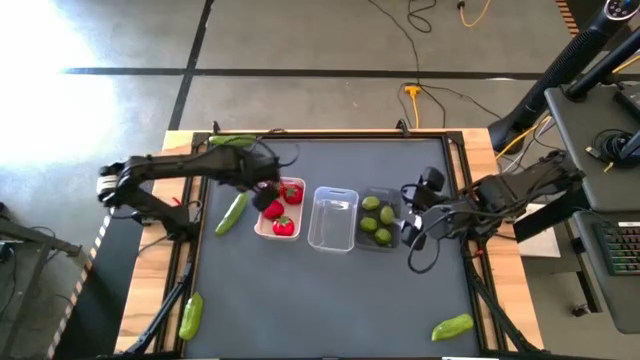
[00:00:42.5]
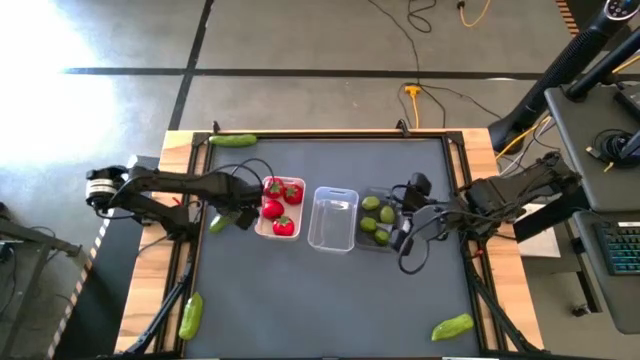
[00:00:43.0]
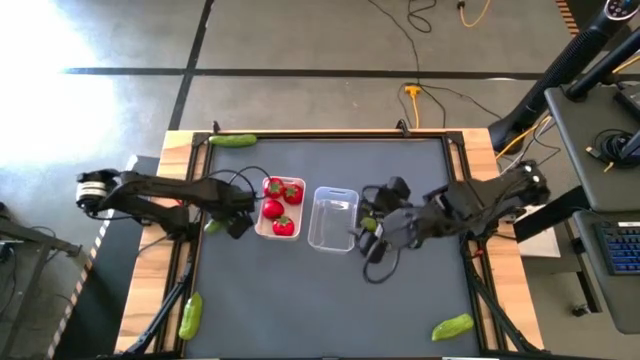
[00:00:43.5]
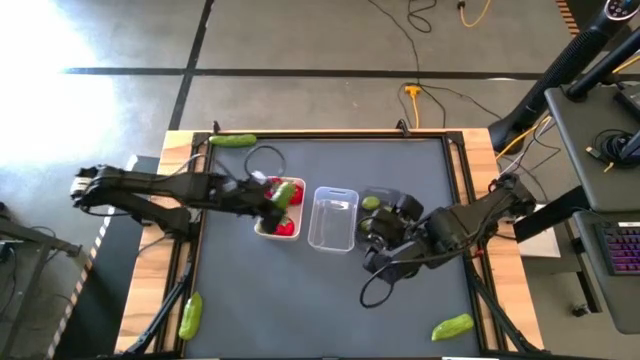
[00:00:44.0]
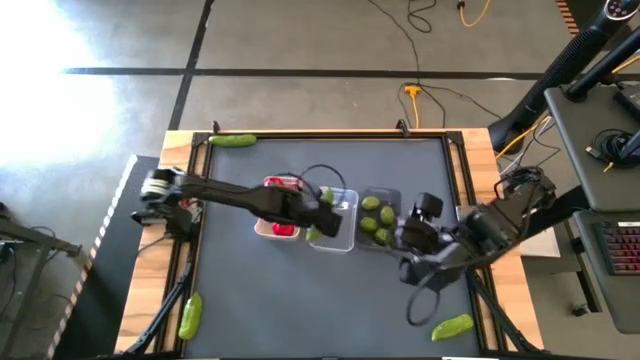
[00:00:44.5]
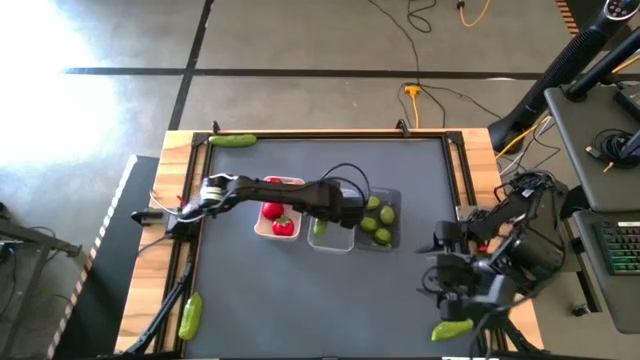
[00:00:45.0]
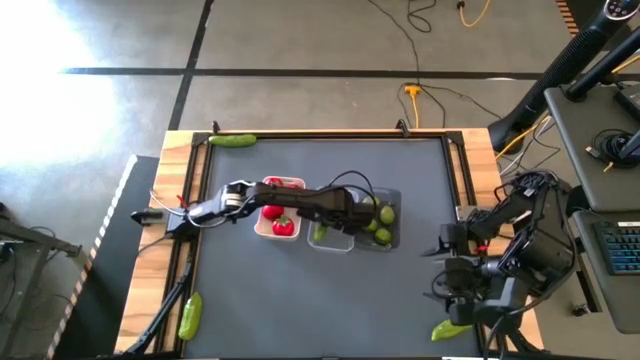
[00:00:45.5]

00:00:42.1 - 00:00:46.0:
Task: Sort produce into baskets
Put the green cucumber into the transparent bin

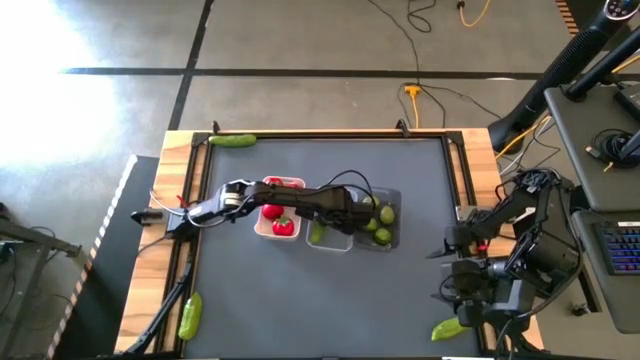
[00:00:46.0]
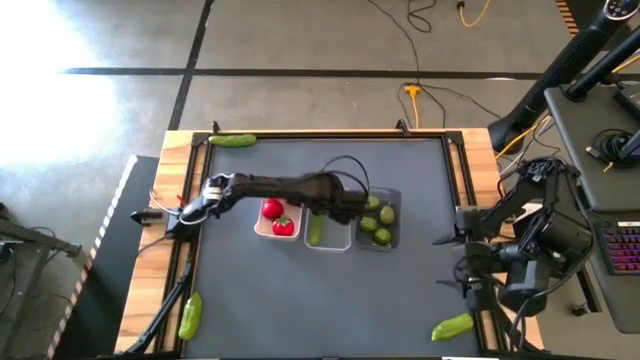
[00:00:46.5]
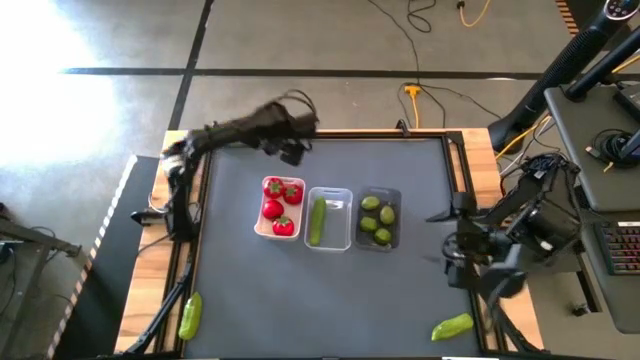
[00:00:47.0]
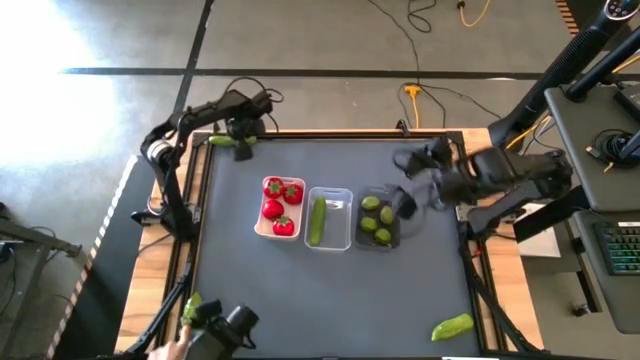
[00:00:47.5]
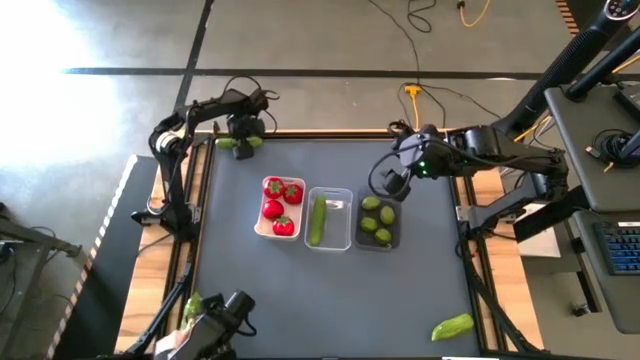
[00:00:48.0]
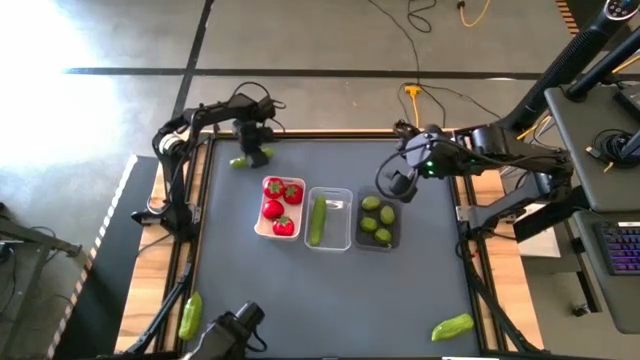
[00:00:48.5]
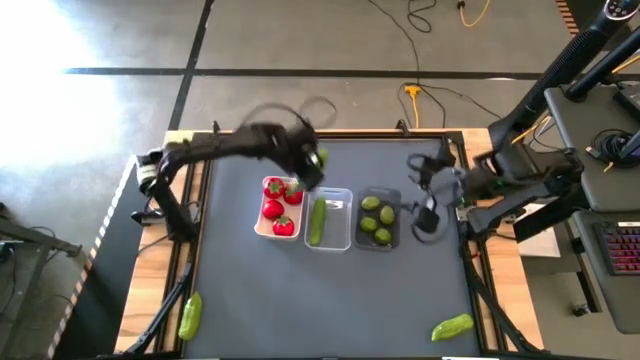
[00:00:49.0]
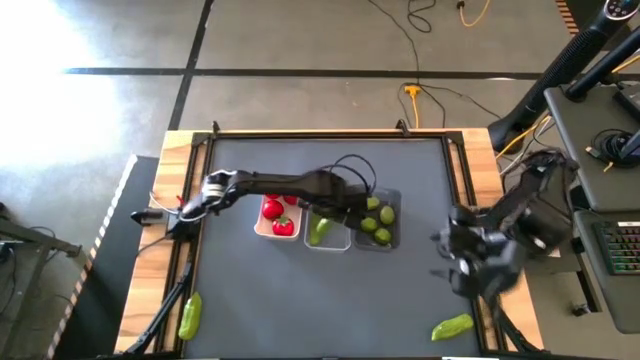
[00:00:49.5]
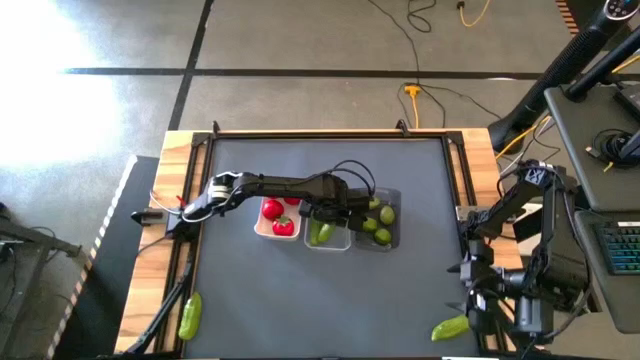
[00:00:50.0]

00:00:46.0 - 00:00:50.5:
Put the green cucumber into the transparent bin

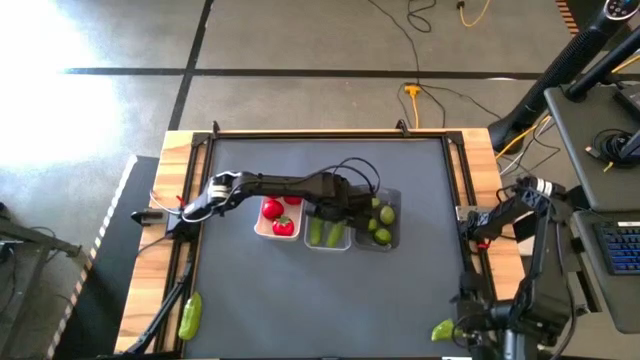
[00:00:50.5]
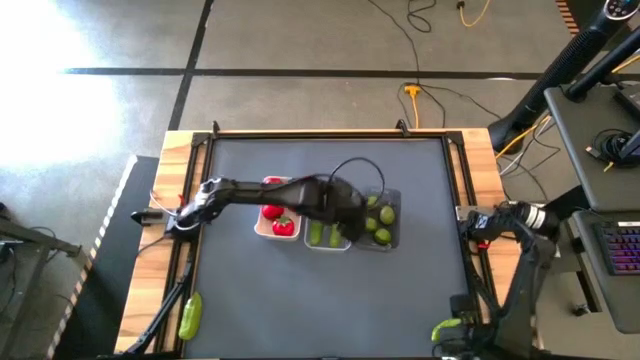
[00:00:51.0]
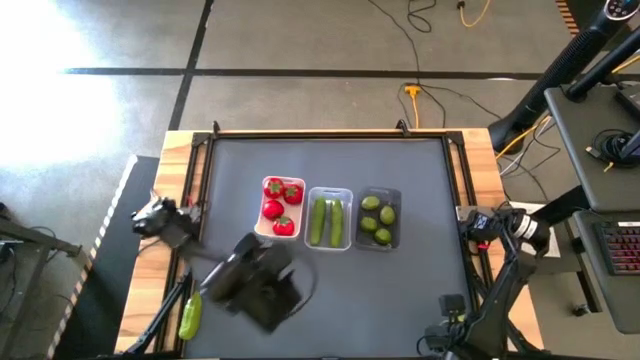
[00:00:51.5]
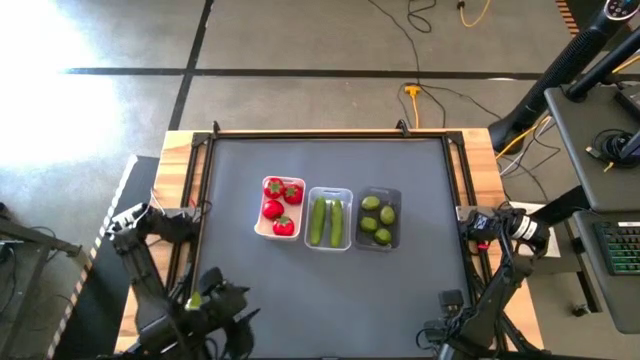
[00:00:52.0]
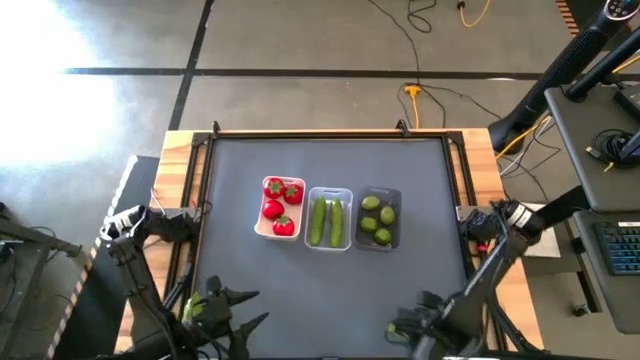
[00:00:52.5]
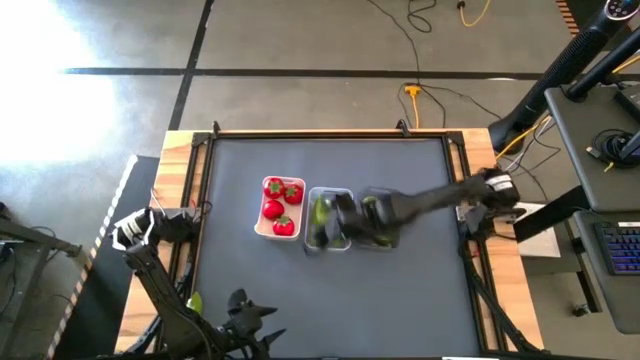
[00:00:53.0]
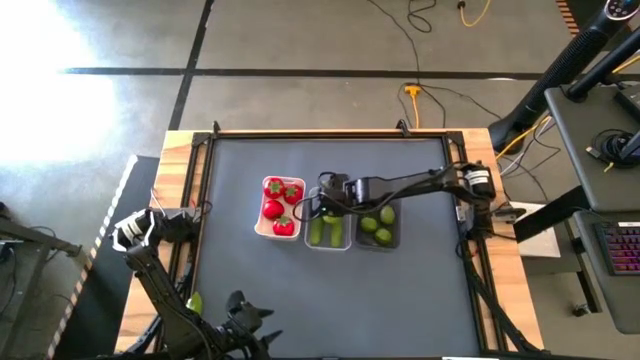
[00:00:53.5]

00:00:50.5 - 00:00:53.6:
Put the green cucumber into the transparent bin

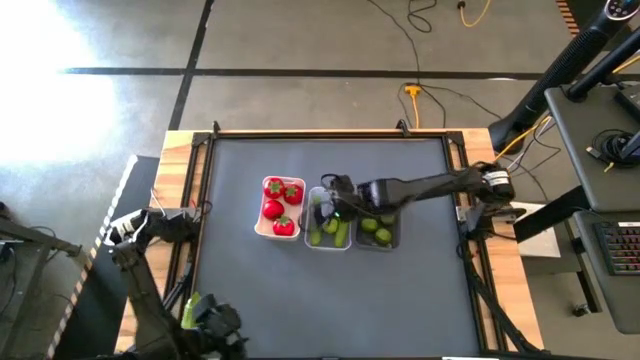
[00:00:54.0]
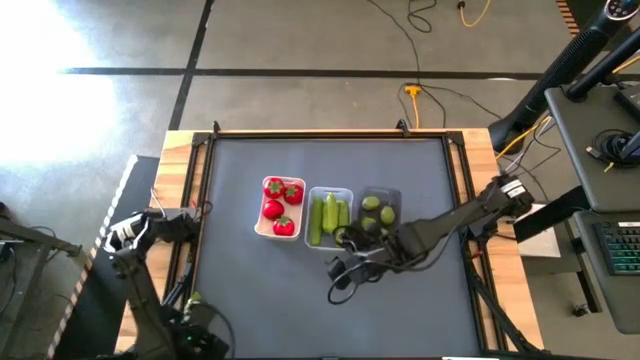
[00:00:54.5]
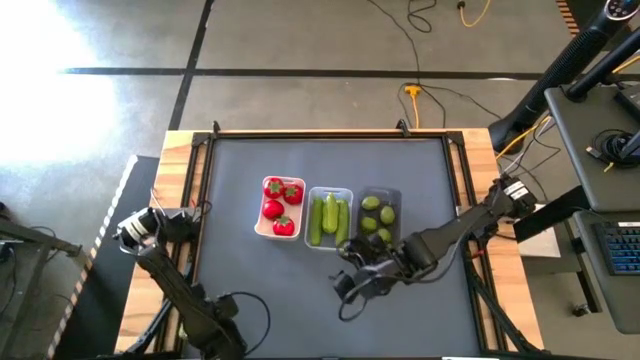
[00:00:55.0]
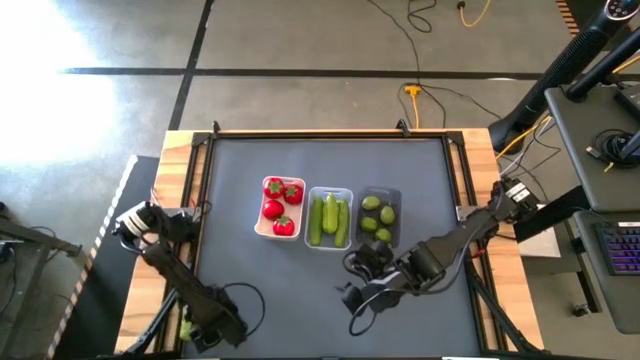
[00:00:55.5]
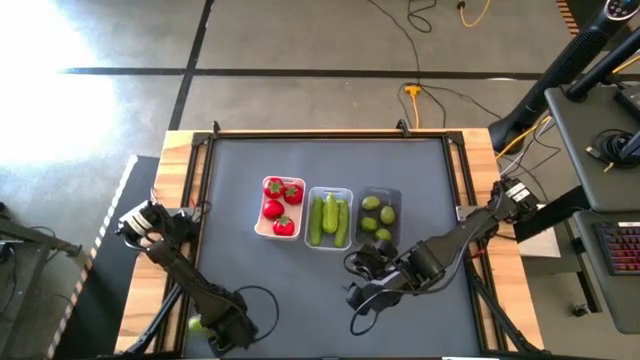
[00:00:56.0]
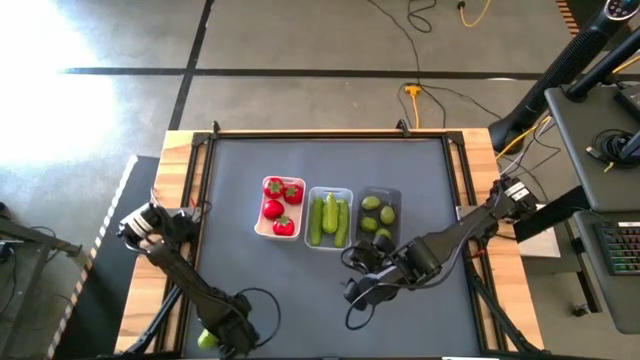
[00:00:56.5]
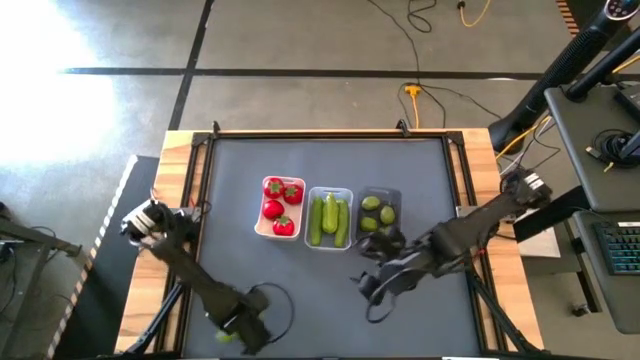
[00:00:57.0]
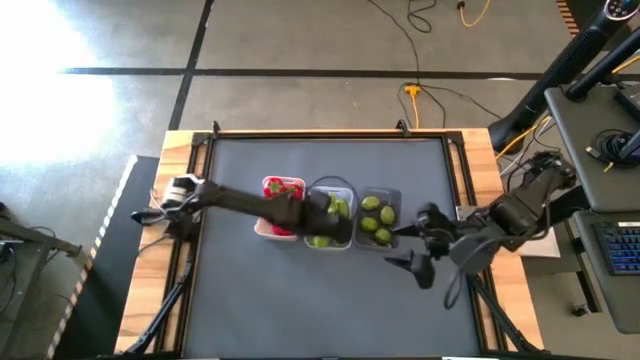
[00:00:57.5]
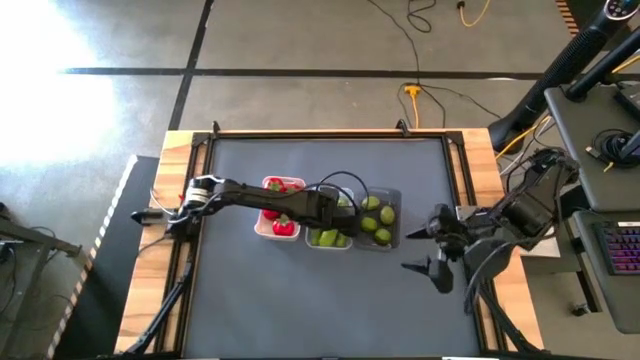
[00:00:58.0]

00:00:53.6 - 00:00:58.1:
Put the green cucumber into the transparent bin

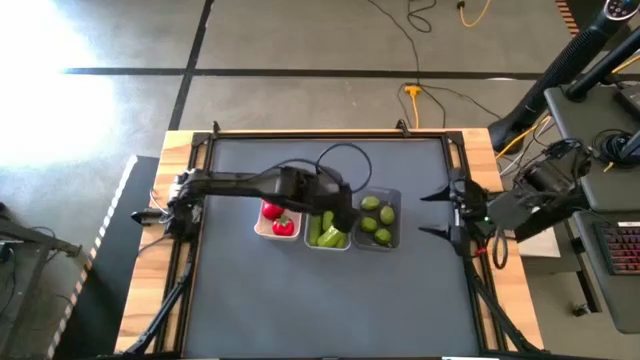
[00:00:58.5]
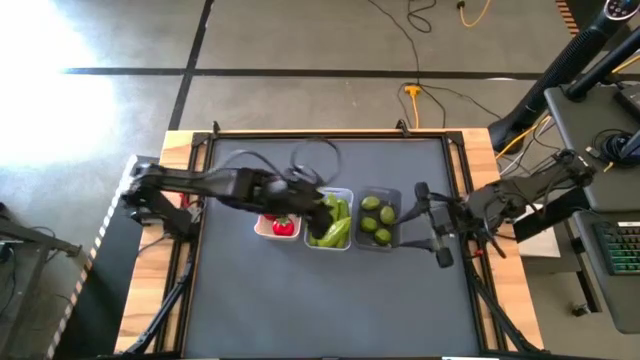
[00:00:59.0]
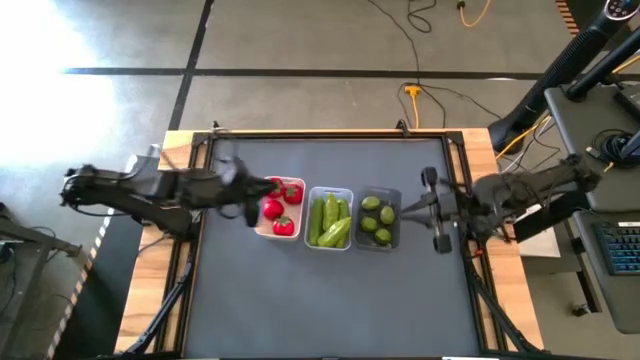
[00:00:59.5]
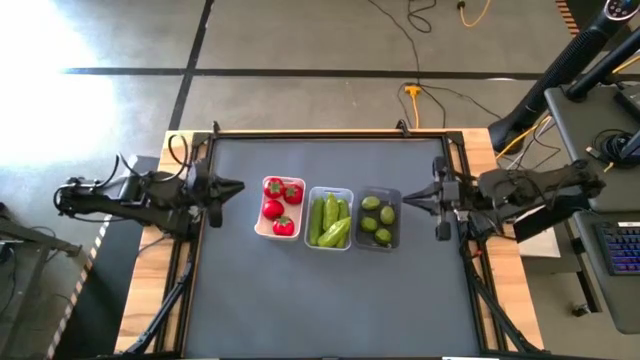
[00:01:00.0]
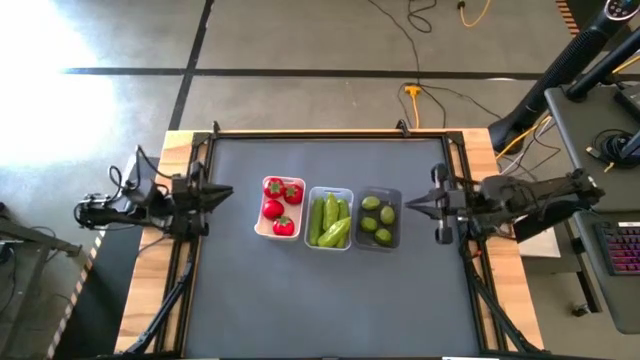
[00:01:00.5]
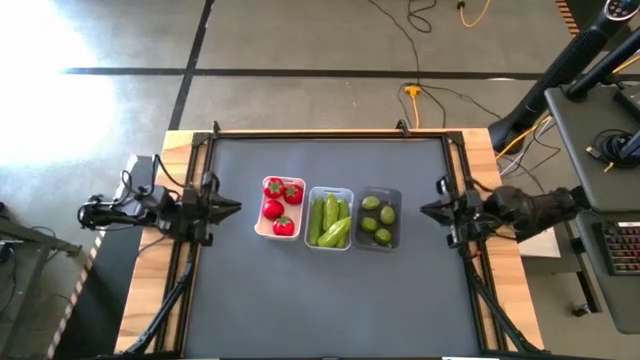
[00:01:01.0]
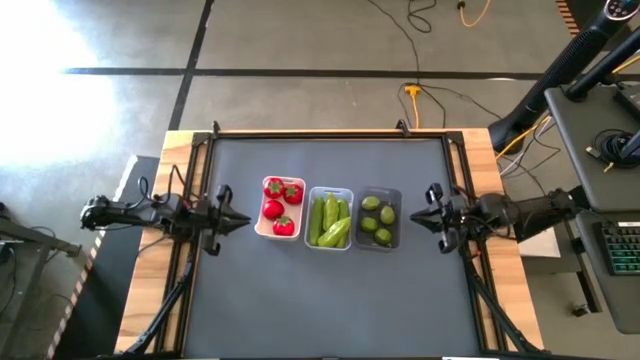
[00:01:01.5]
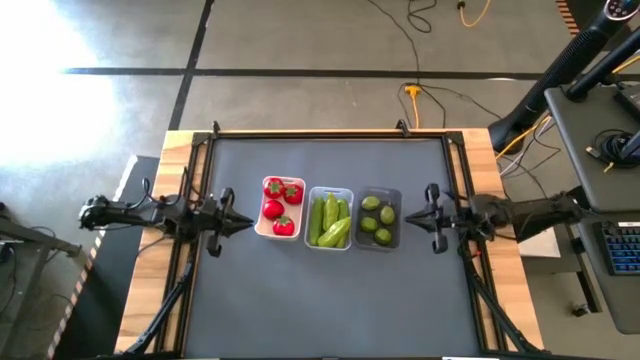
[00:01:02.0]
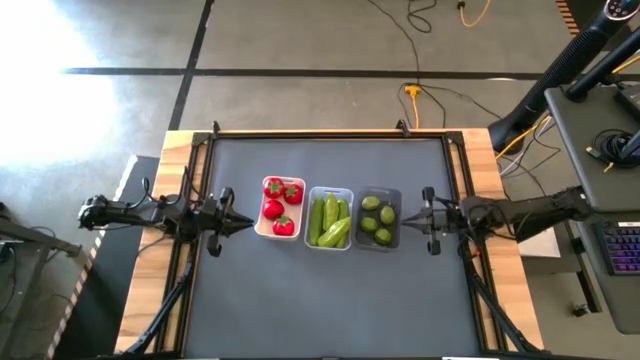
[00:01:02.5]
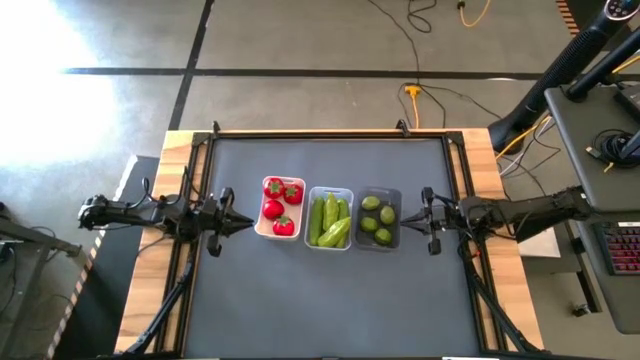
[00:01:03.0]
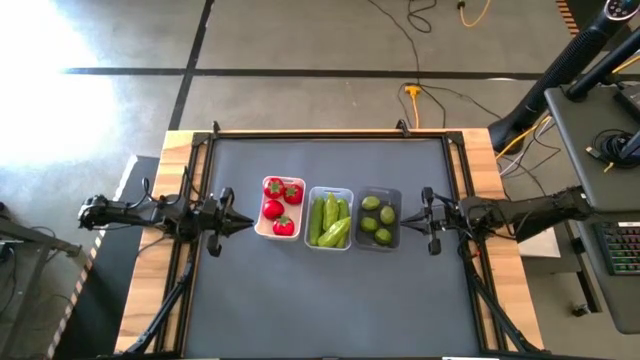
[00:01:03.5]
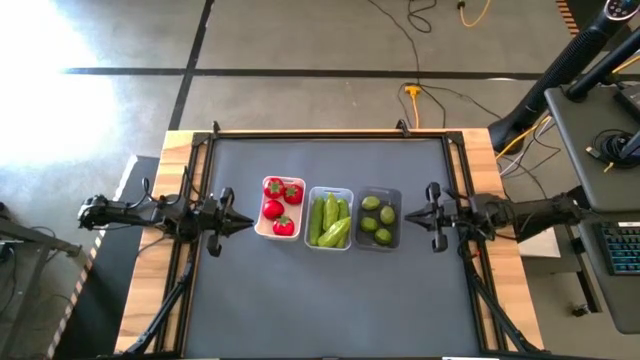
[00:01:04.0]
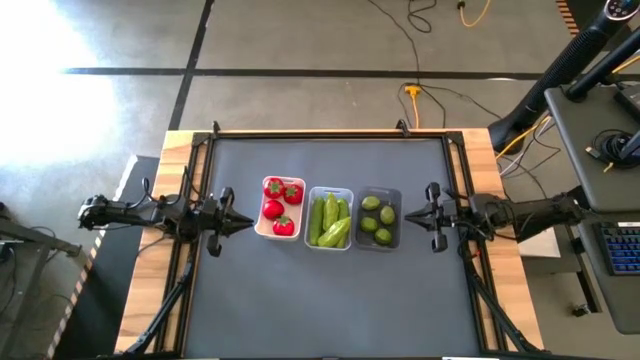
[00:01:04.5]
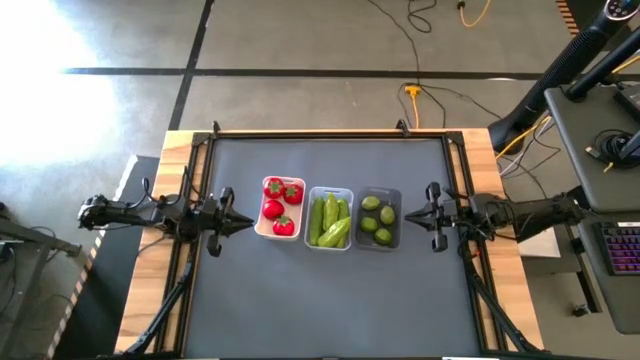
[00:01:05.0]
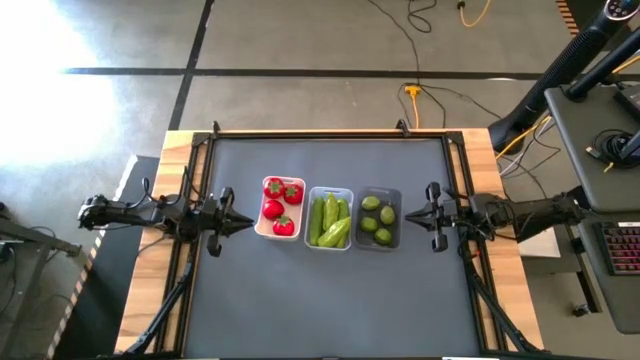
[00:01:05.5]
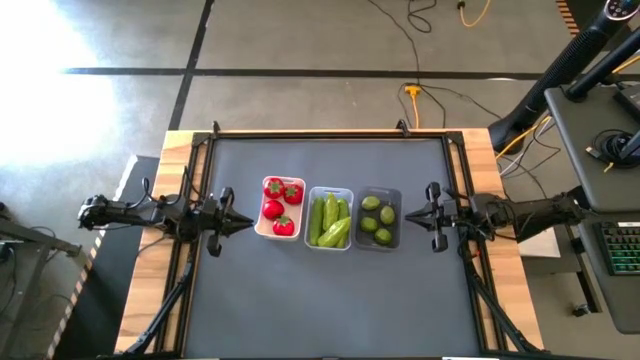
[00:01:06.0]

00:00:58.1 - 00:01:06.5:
Return to Home Position
